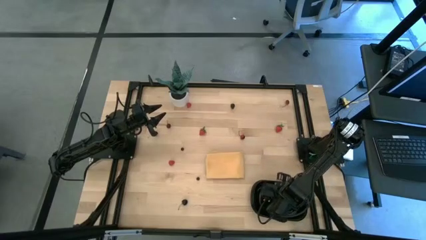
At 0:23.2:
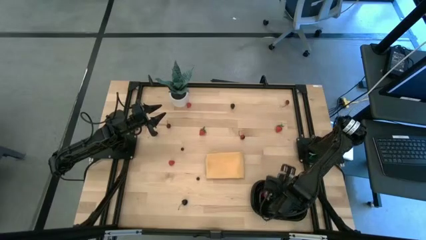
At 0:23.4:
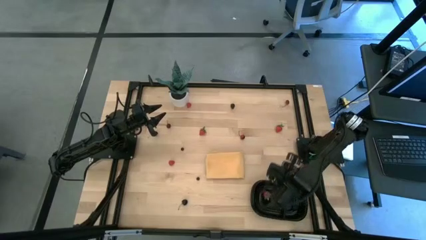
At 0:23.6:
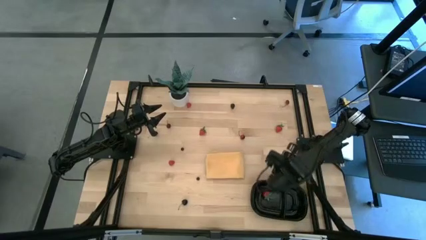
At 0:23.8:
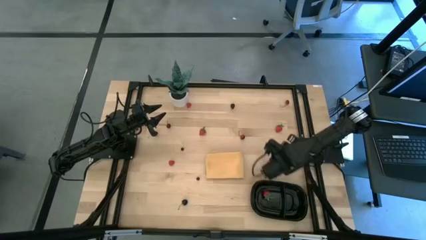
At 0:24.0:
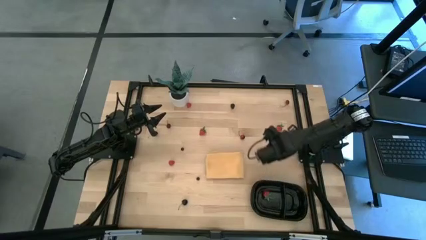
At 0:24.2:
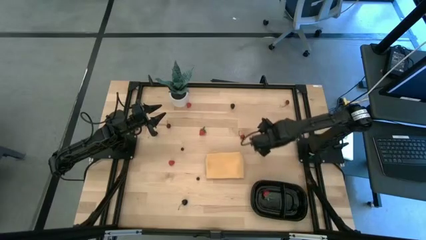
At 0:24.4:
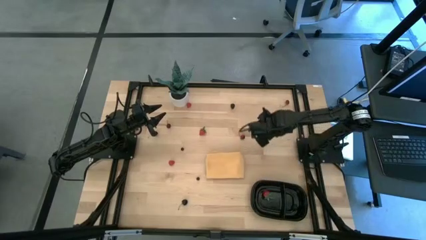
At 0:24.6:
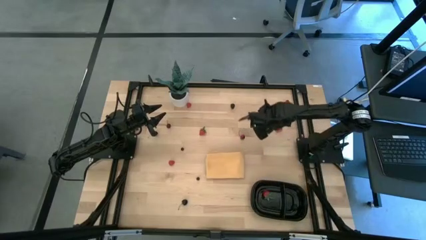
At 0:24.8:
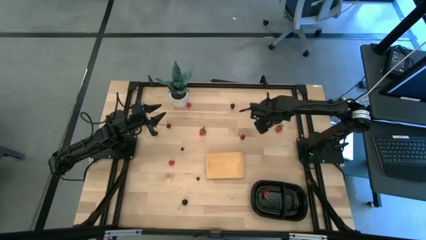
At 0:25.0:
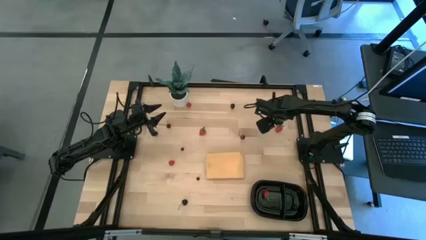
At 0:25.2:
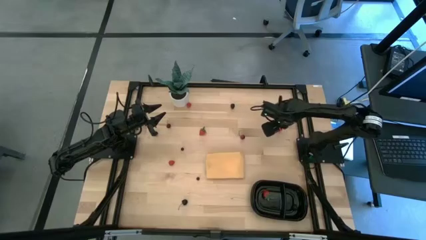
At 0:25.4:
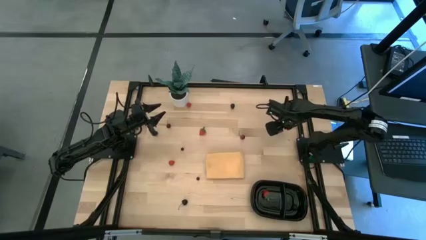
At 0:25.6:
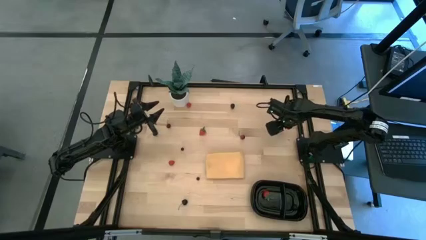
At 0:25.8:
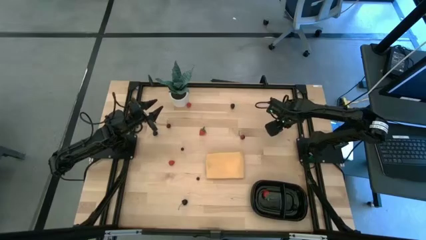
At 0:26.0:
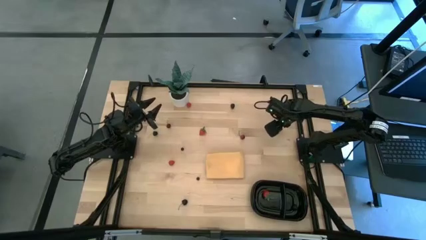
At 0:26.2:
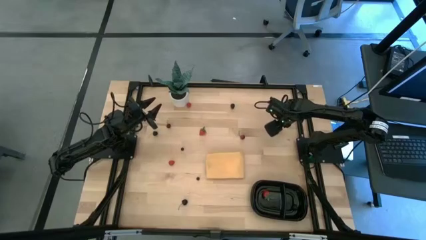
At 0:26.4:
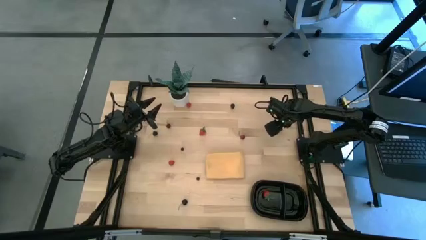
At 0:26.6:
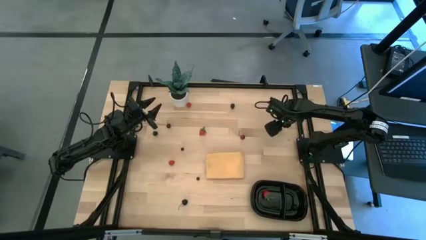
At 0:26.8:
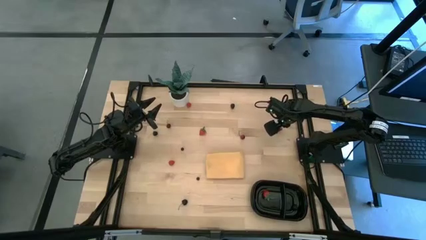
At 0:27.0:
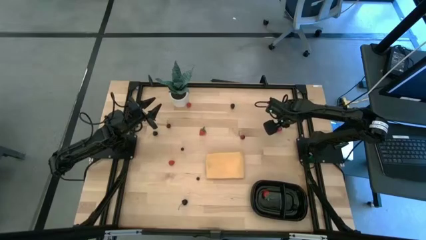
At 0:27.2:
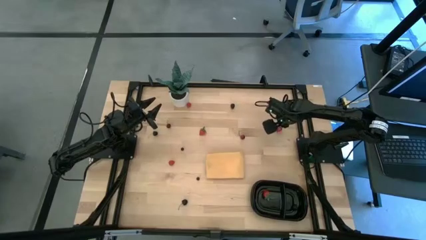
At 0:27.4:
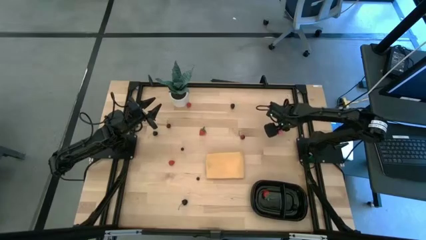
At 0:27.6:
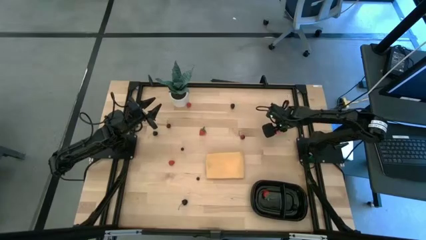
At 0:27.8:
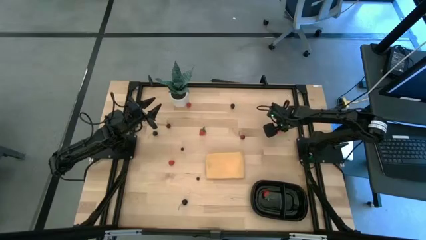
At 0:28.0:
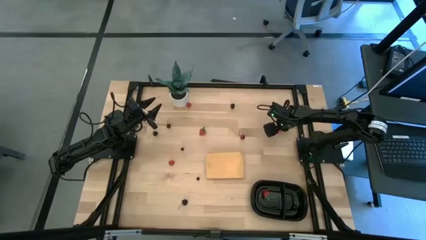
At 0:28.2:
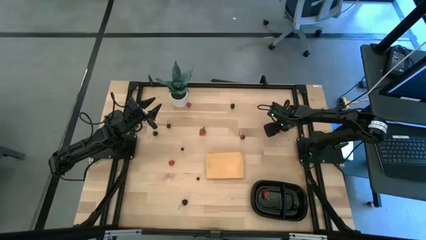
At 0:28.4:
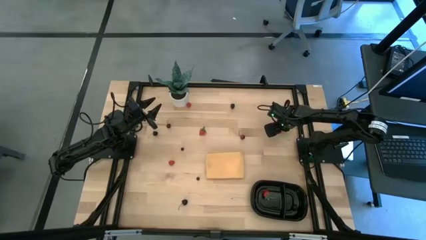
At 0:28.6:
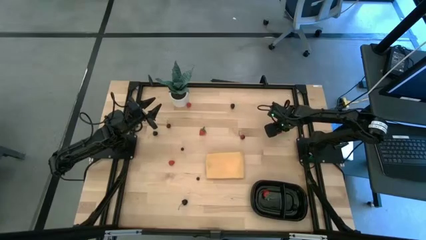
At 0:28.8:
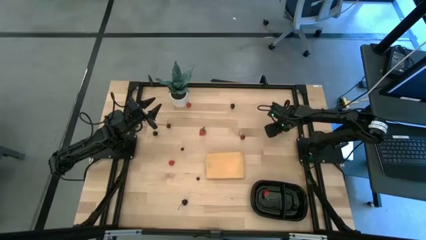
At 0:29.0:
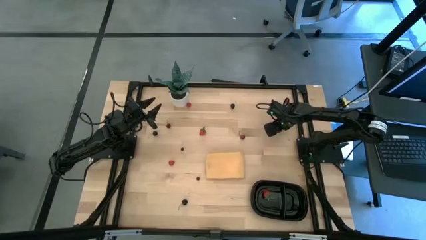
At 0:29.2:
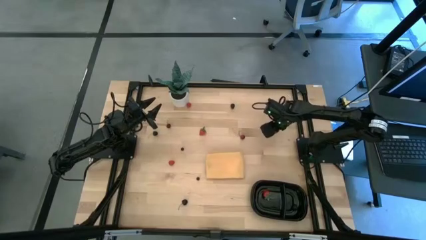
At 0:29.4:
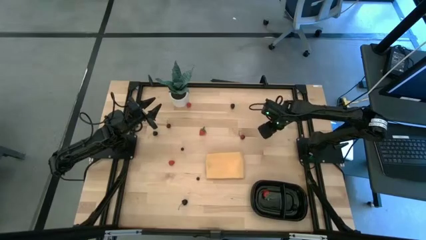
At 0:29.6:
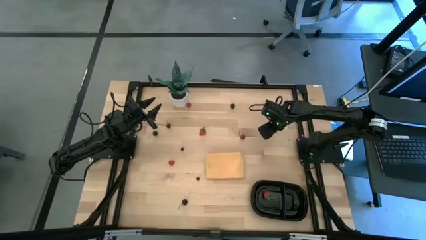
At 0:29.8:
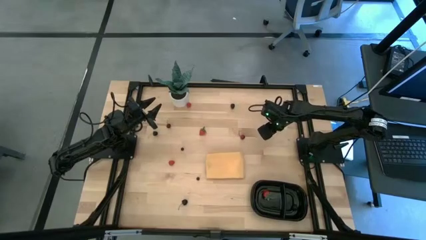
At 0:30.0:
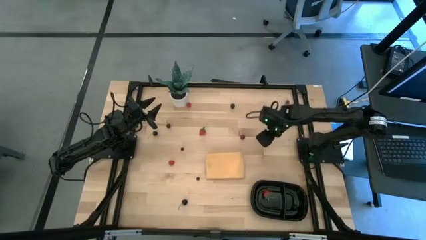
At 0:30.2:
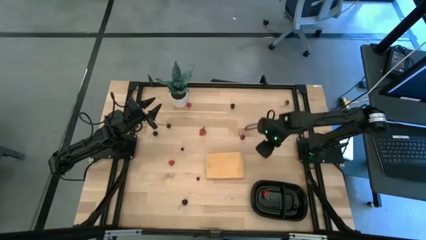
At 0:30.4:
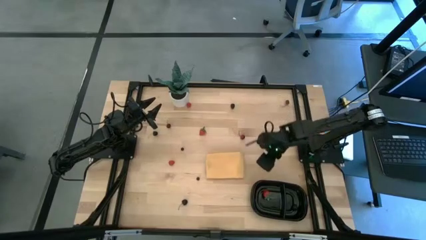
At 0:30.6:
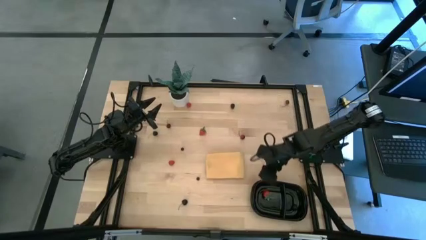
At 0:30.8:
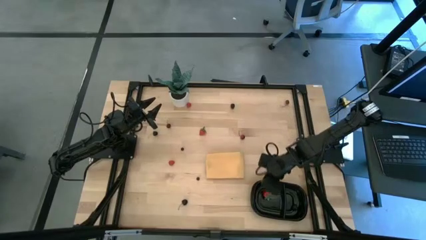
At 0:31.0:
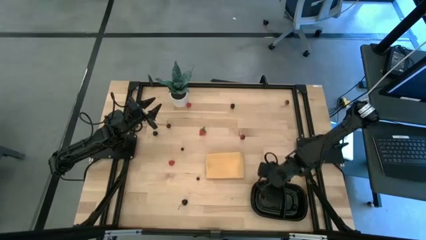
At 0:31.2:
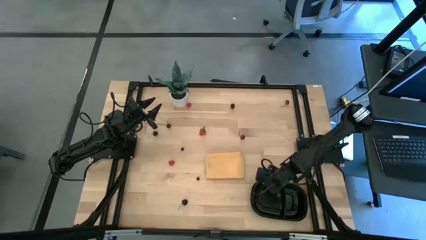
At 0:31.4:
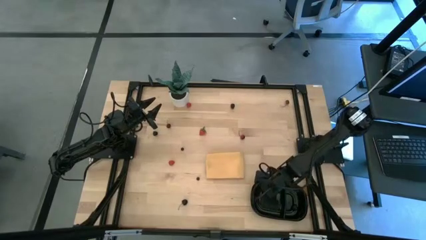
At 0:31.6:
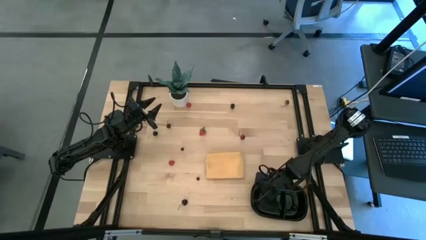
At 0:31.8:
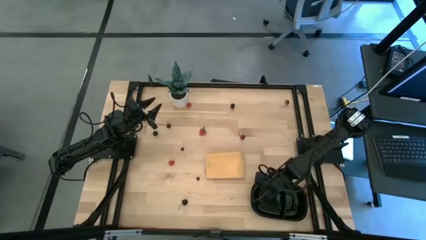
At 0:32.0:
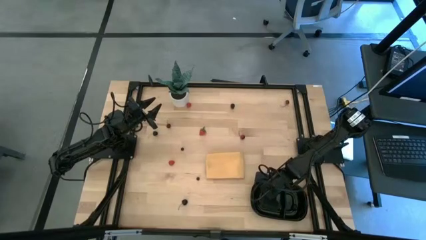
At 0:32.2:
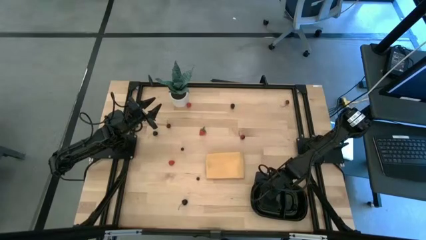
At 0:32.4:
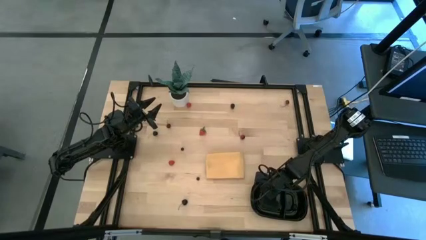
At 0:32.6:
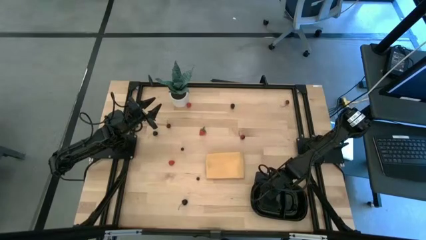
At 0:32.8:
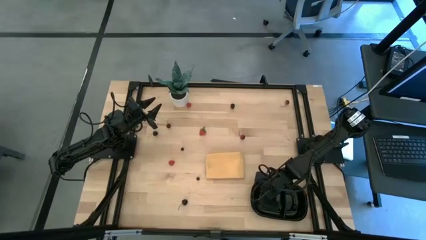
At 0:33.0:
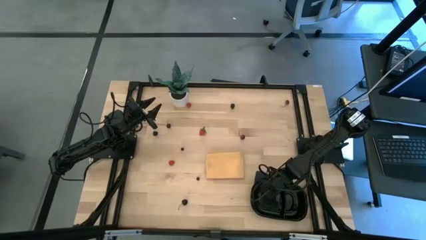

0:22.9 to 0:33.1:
Task: Pick and placing Produce into tupperware
Put the right red strawberry into the black container
